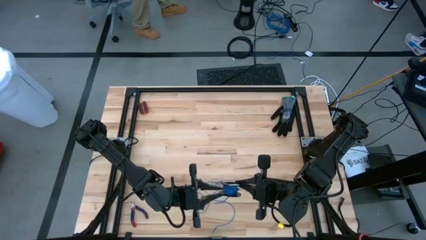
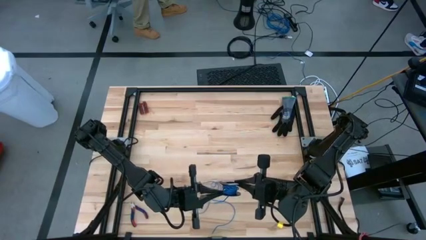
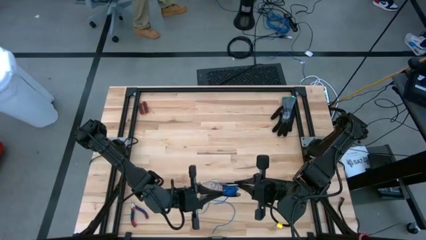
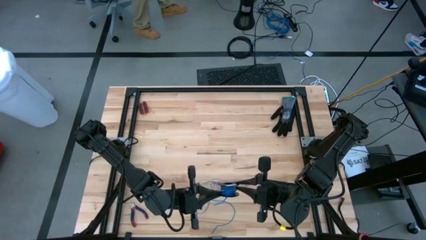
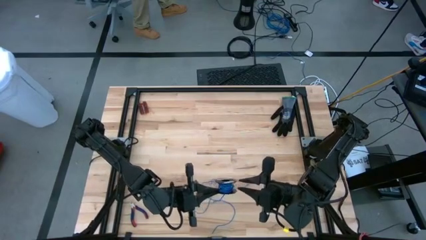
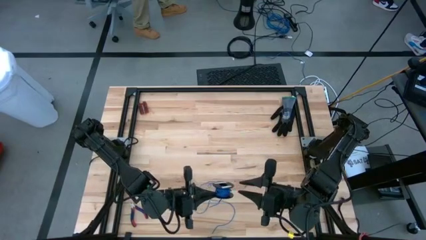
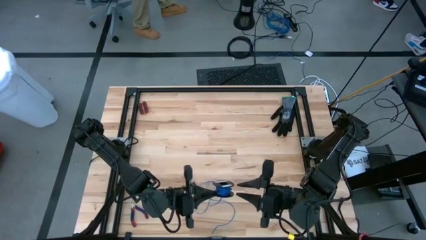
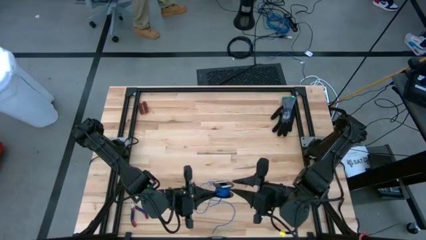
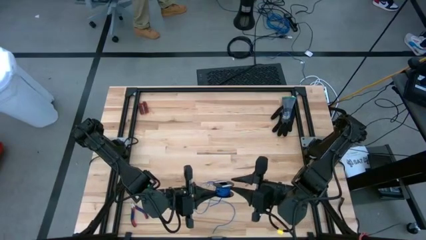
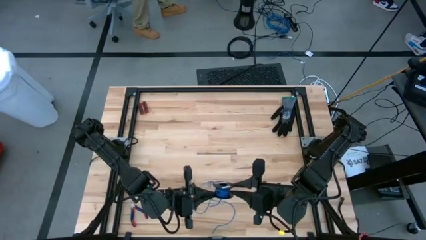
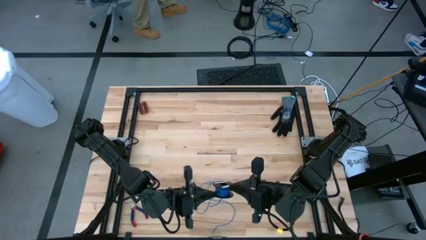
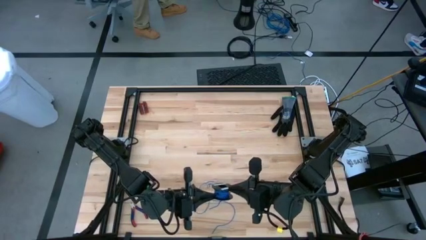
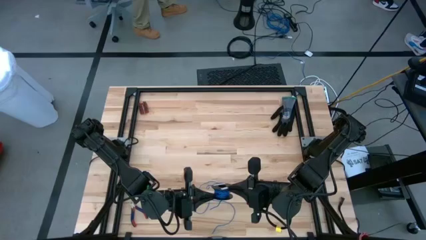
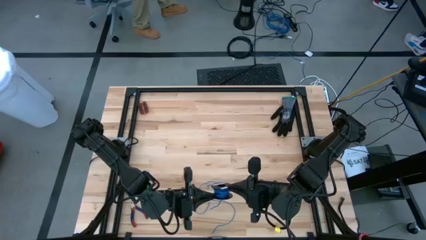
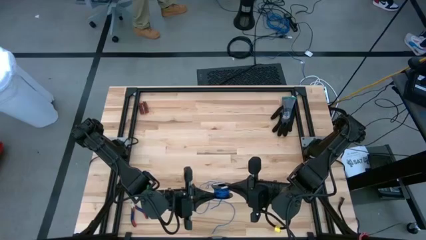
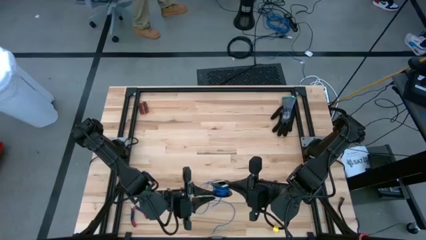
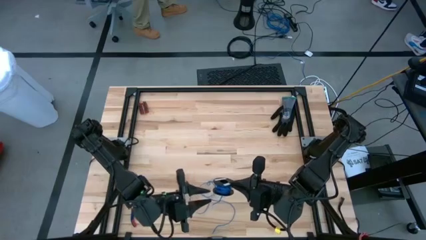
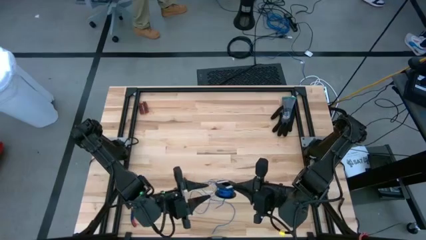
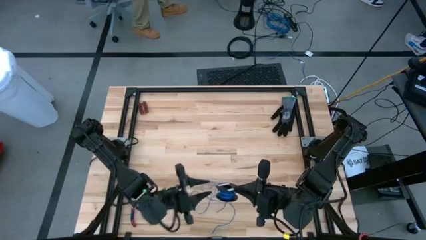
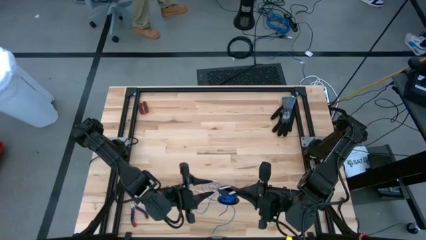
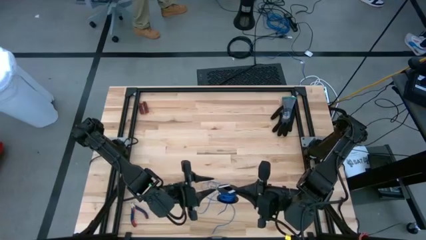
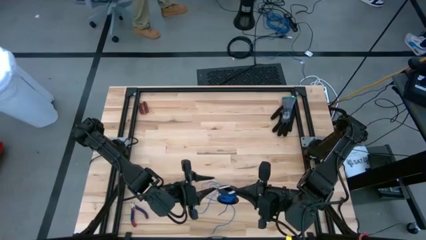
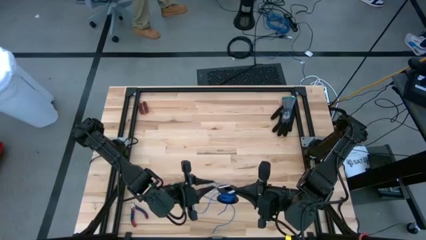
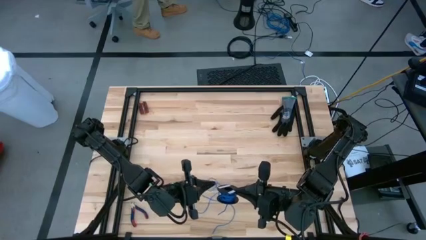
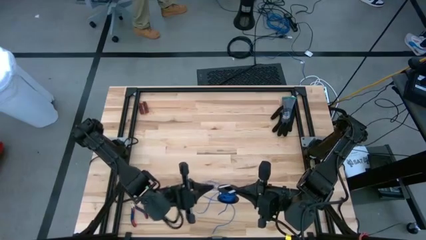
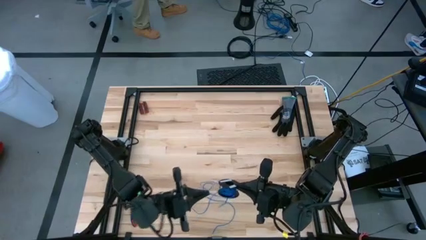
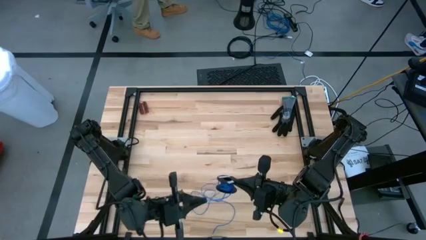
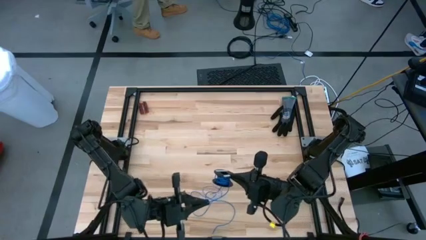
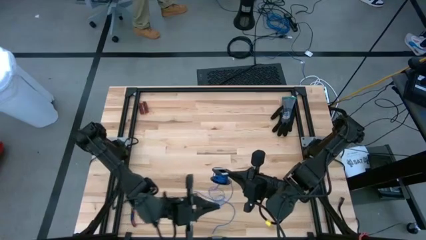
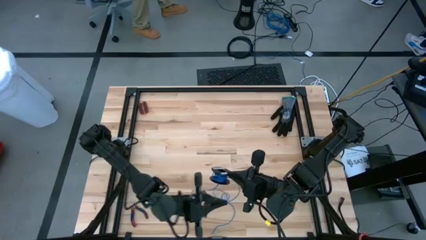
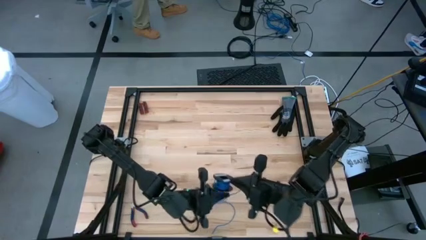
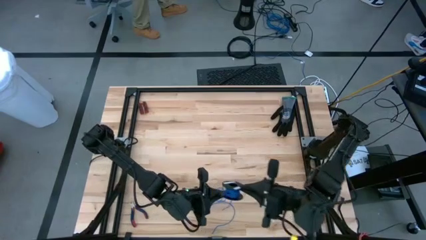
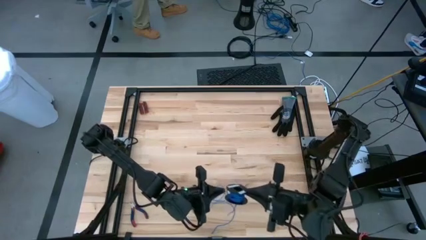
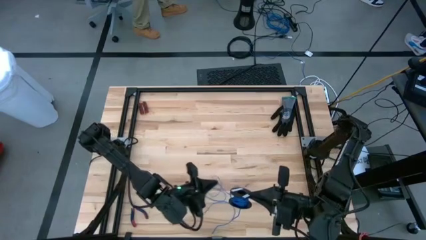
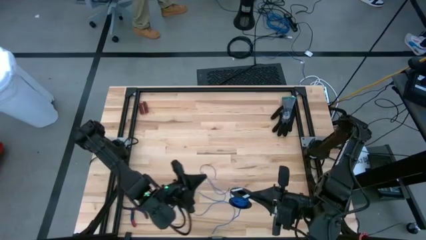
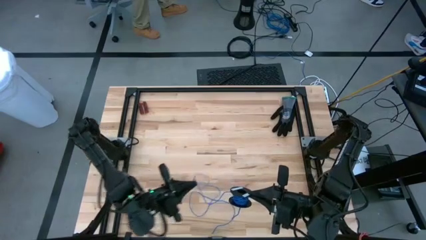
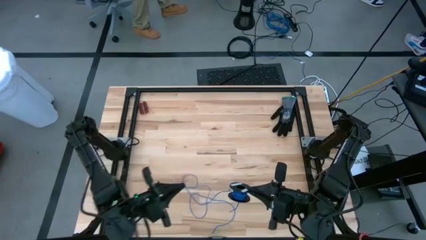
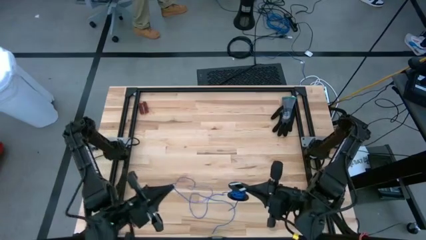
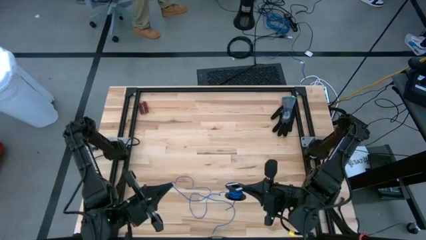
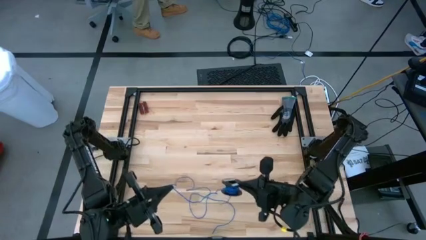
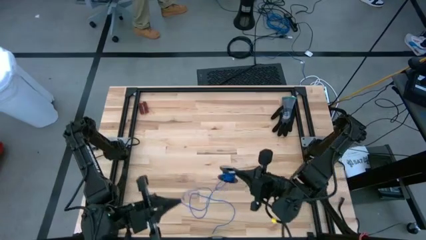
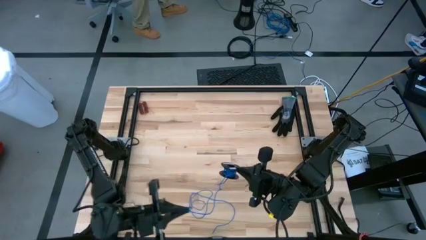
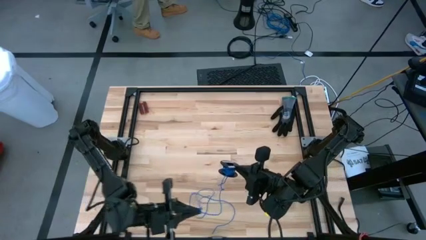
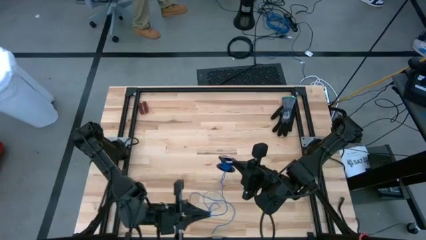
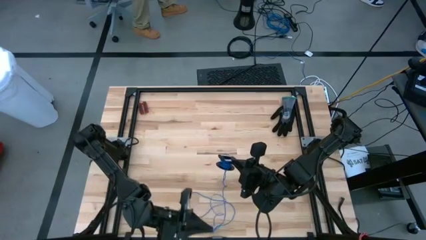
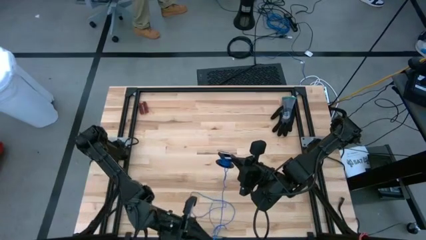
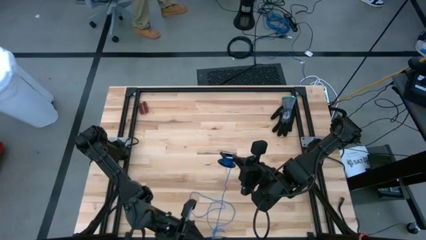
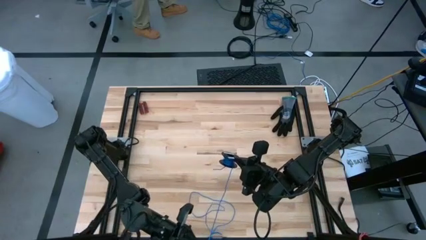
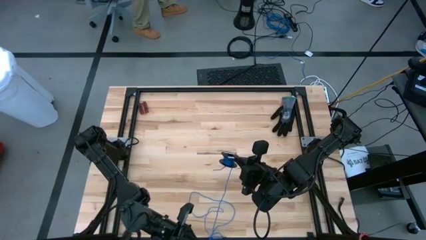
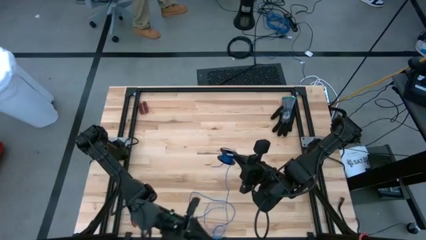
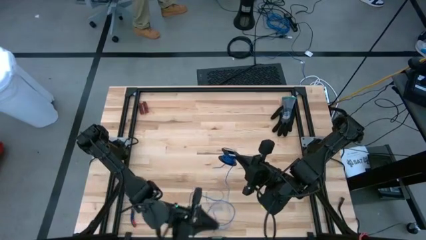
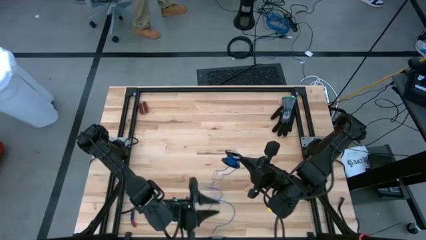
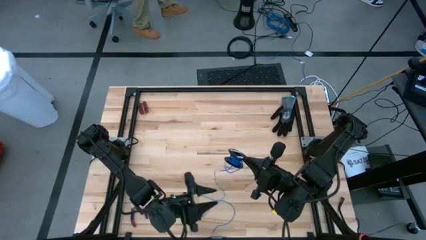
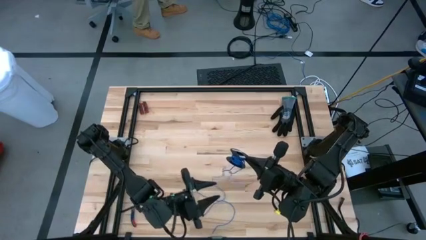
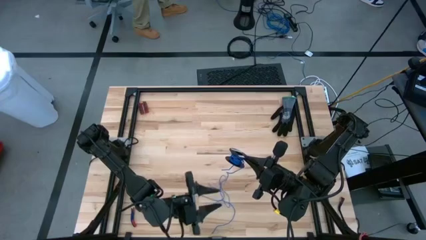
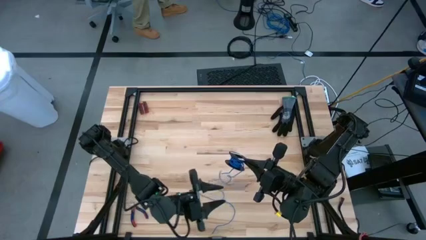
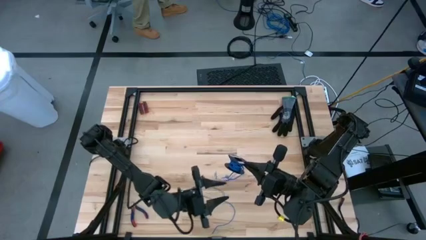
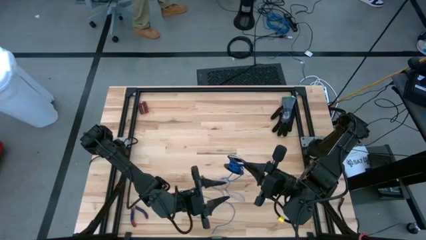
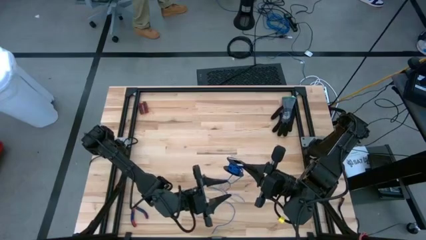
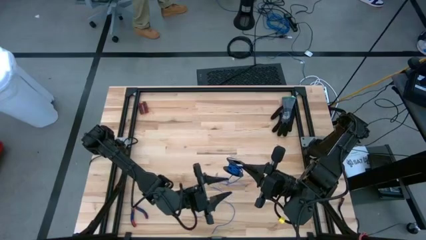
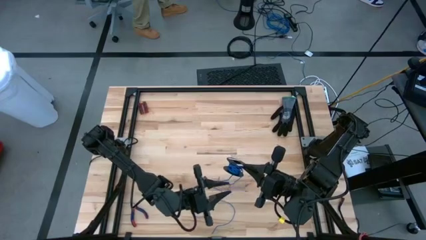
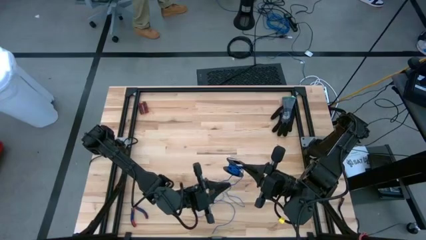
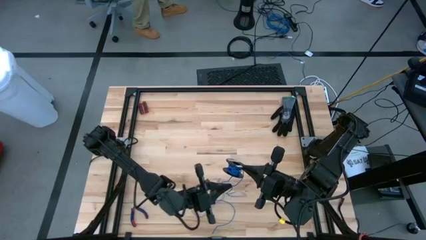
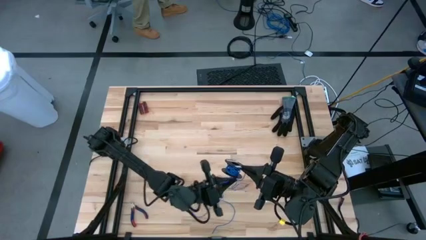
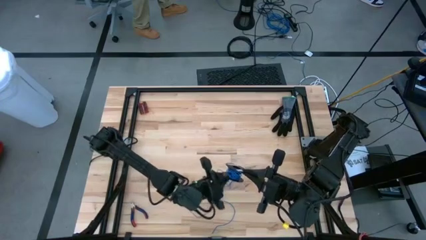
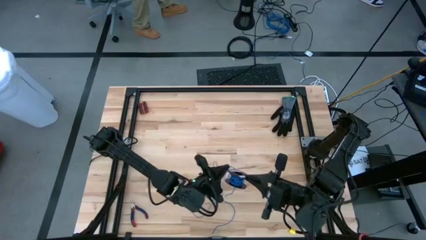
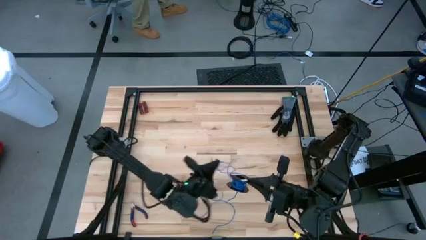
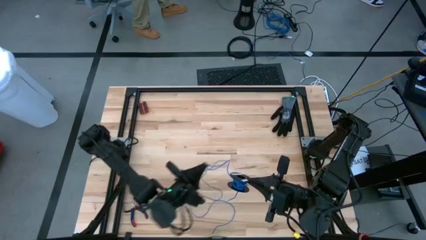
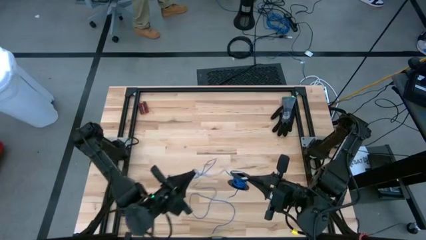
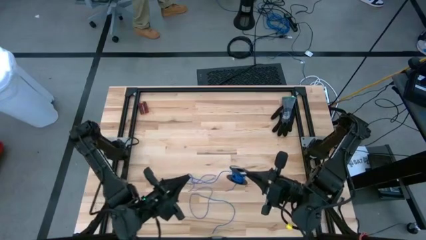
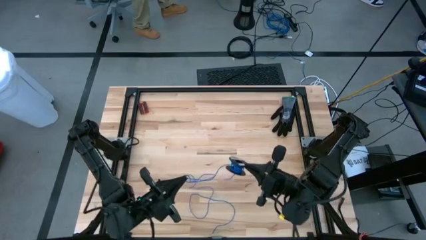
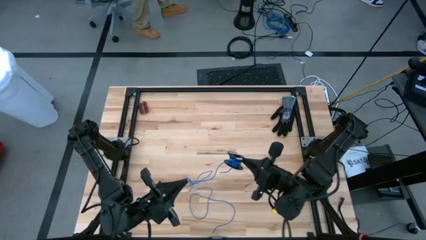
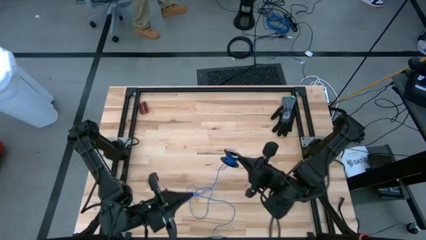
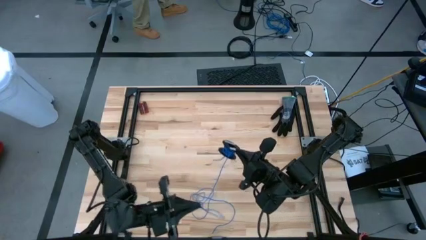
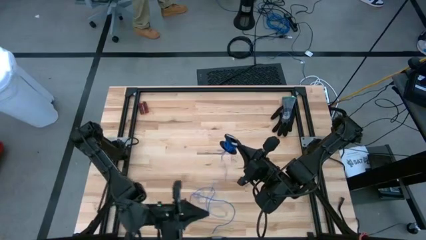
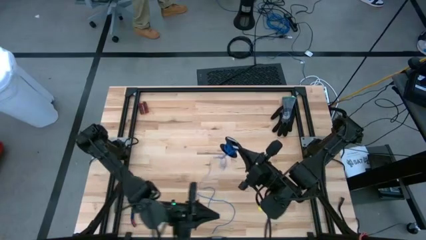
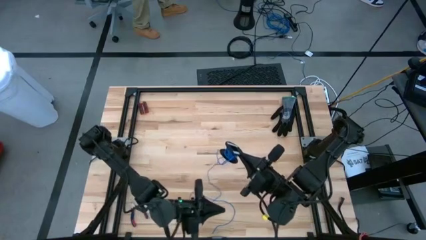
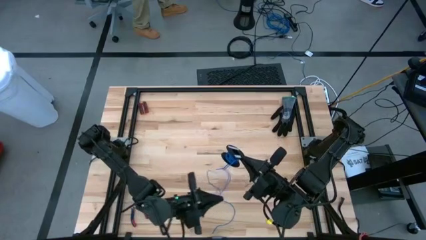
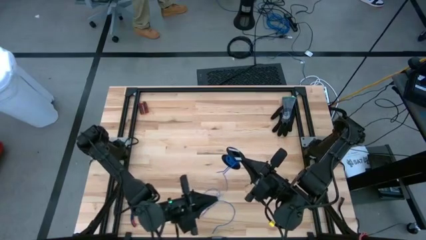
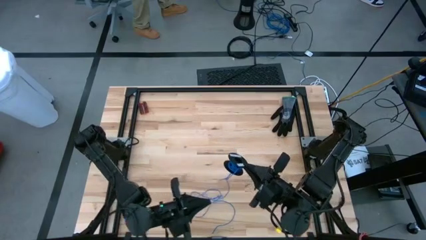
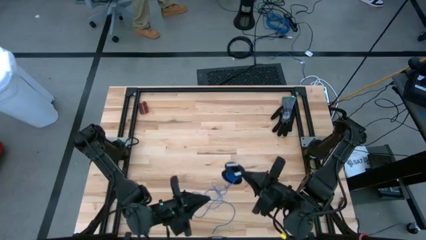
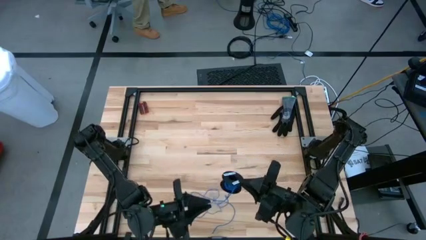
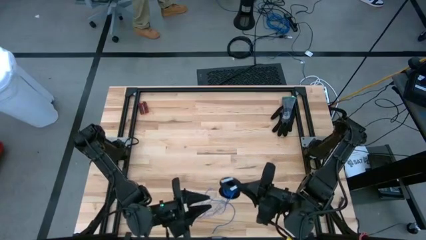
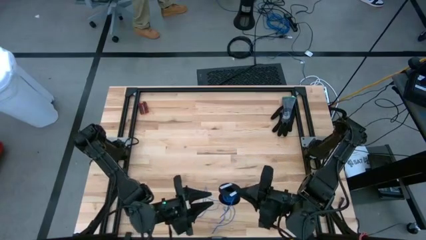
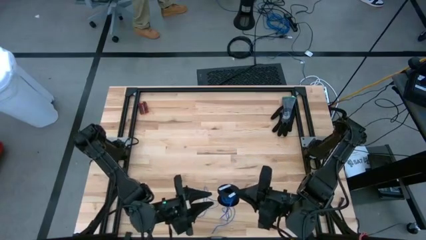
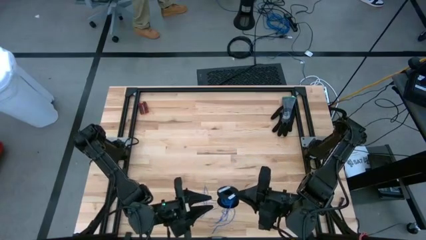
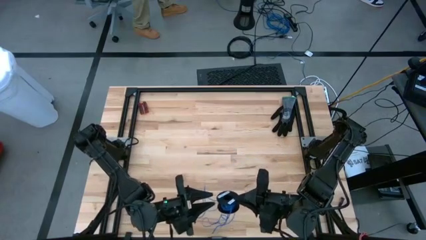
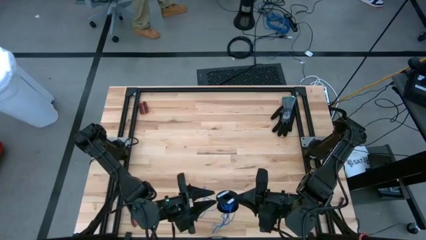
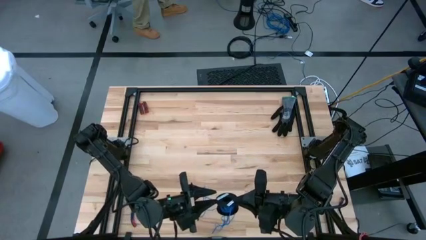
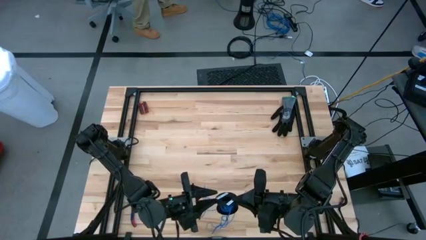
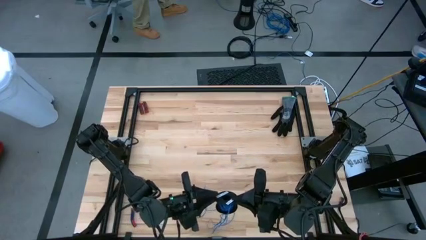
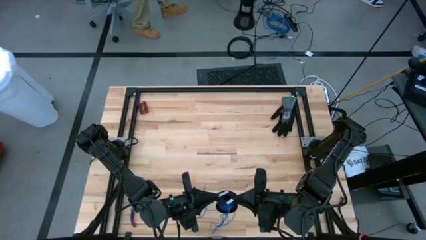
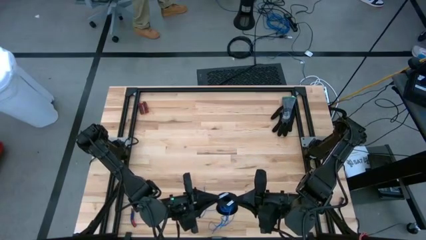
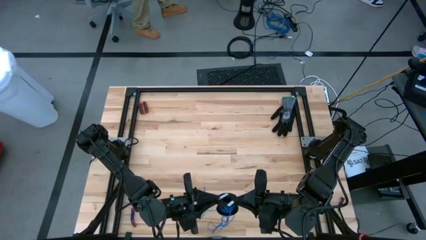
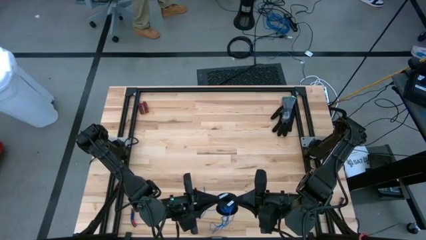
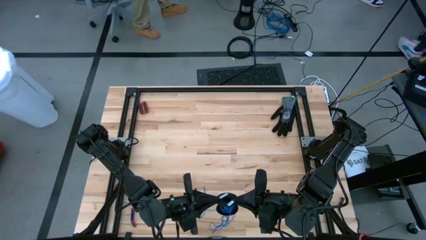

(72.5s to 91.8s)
Task: Coil cords
Uncoil the blue wire from the spool
